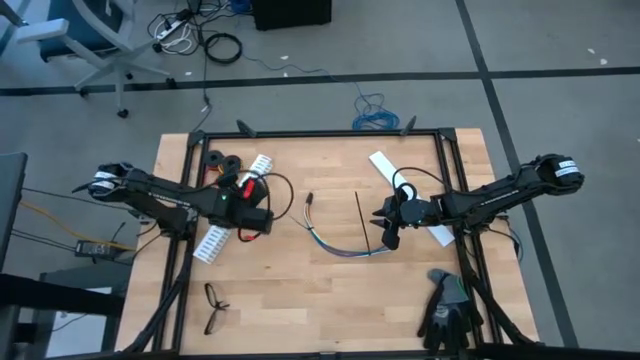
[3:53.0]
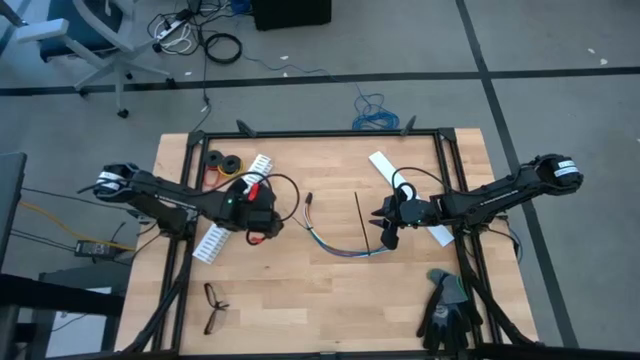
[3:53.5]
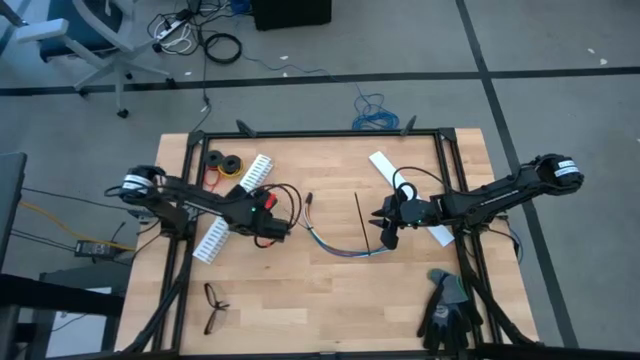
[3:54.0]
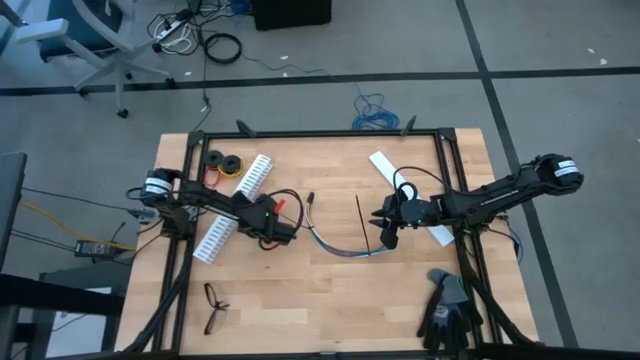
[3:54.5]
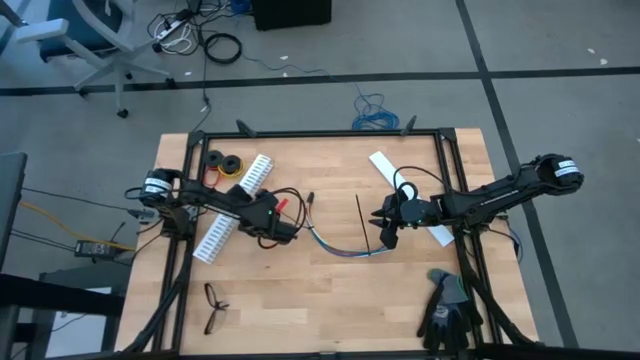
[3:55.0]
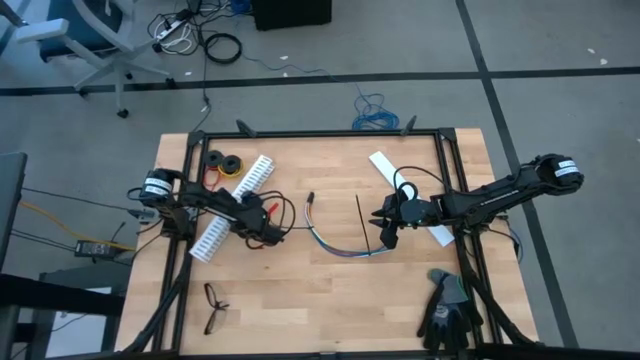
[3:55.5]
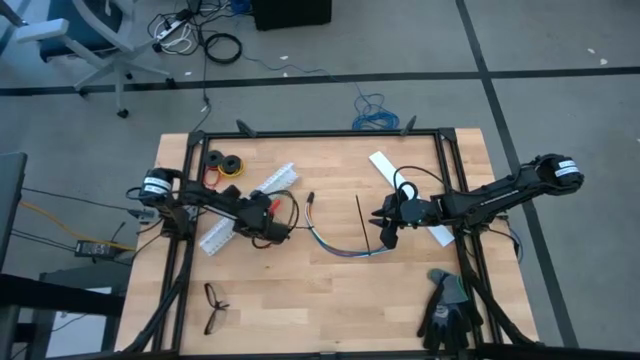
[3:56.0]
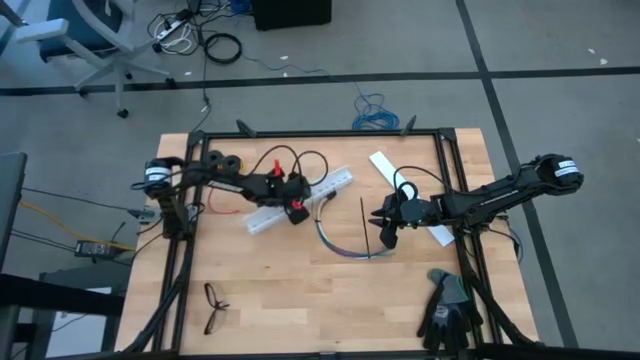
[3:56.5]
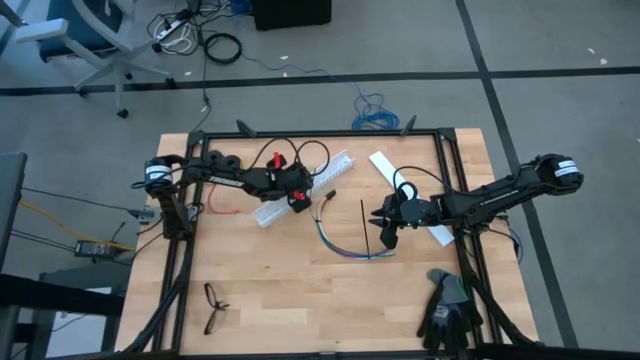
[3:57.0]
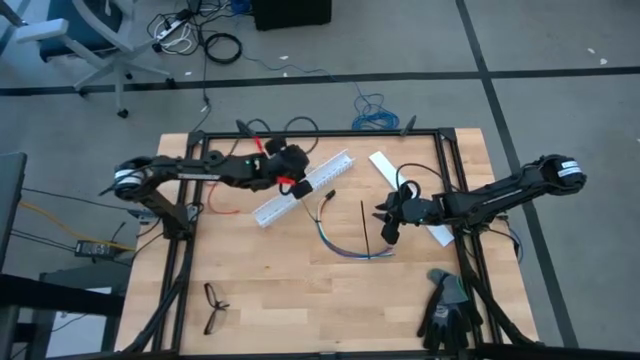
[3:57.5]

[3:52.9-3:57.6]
Task: Ziptie cables
Prepare the white cable duct

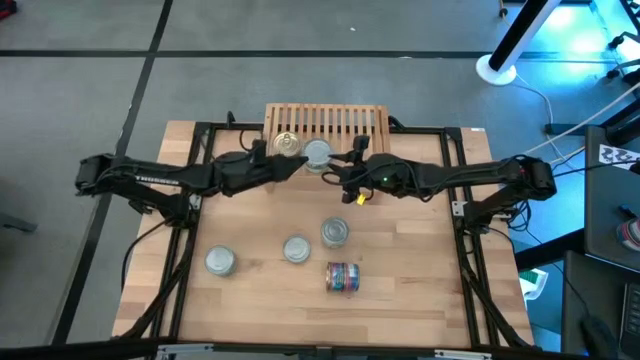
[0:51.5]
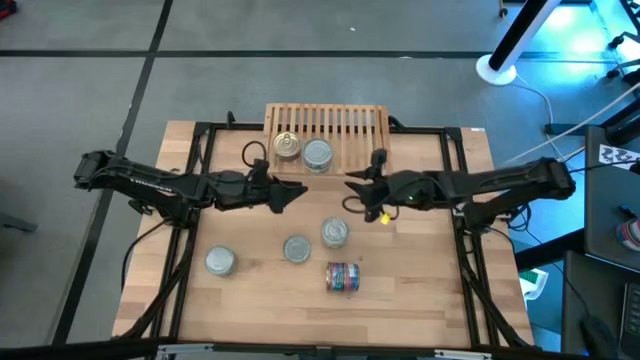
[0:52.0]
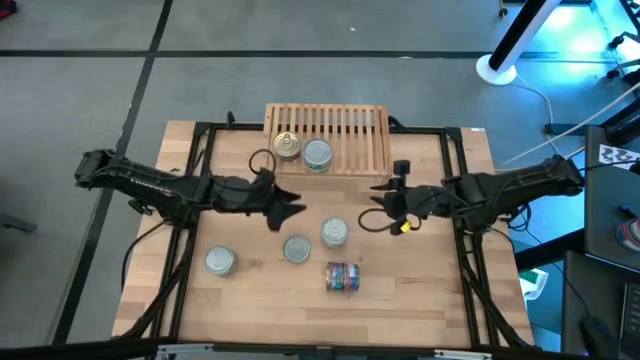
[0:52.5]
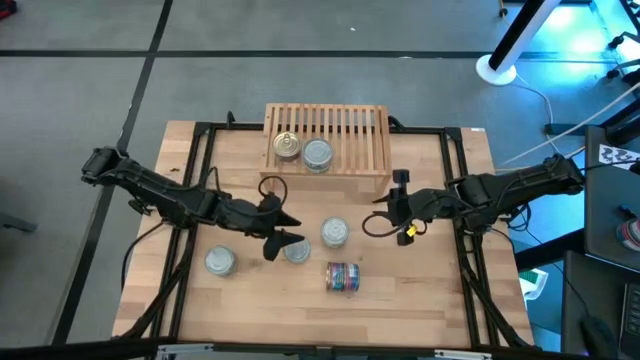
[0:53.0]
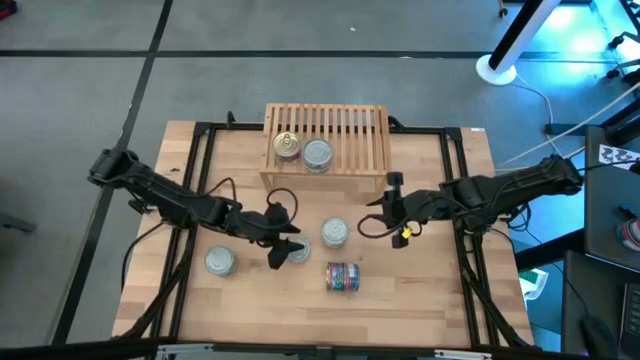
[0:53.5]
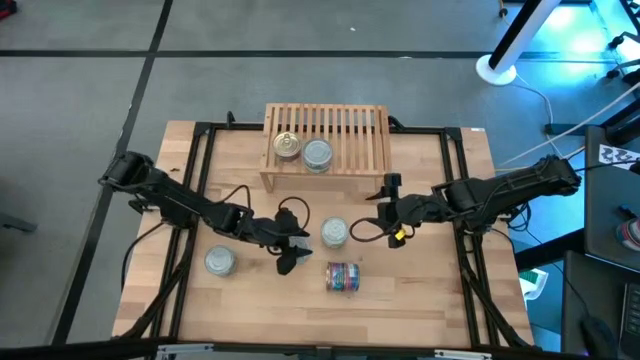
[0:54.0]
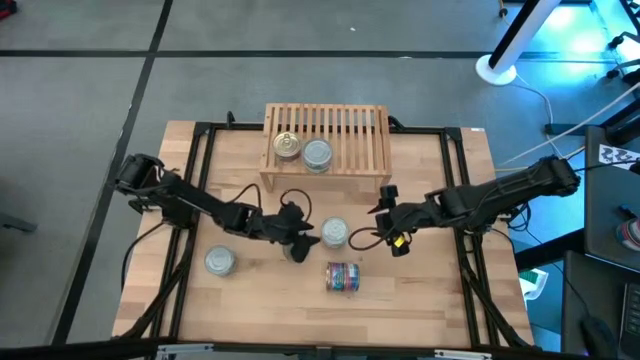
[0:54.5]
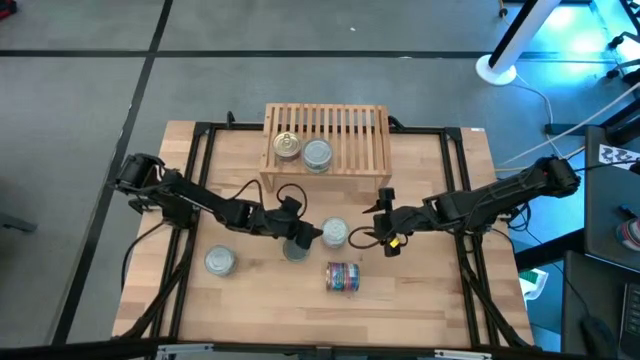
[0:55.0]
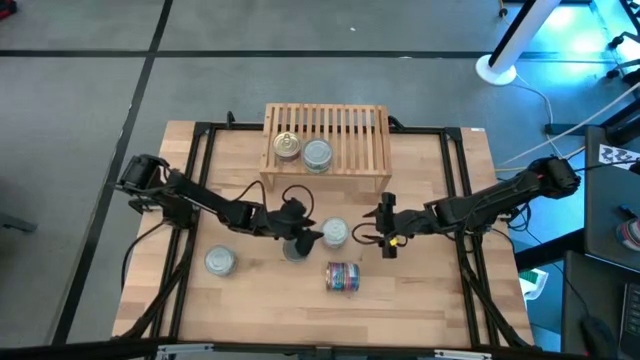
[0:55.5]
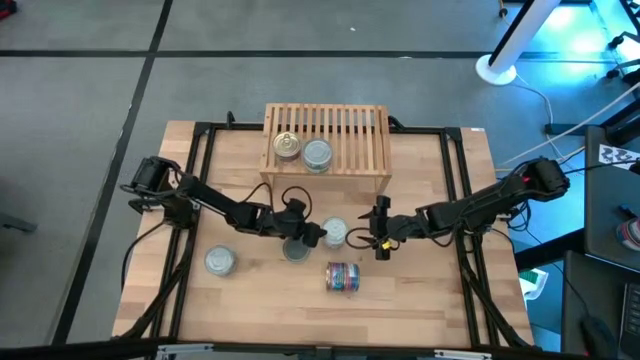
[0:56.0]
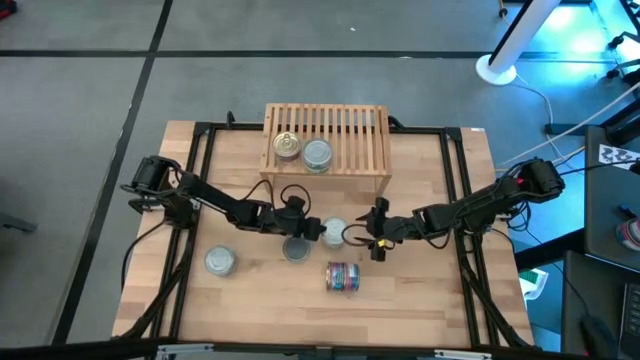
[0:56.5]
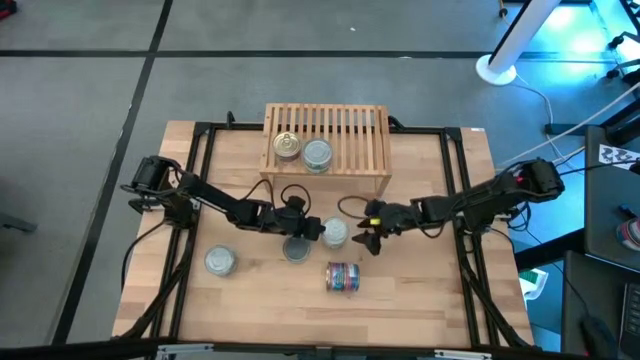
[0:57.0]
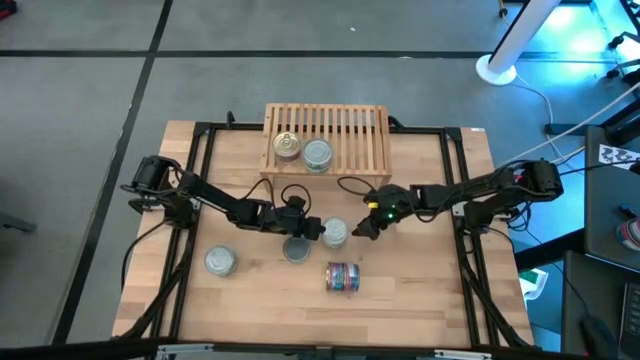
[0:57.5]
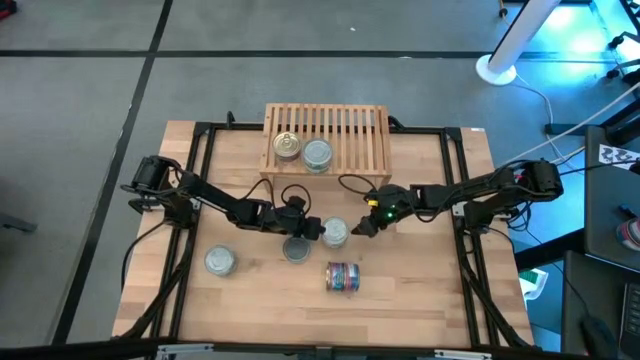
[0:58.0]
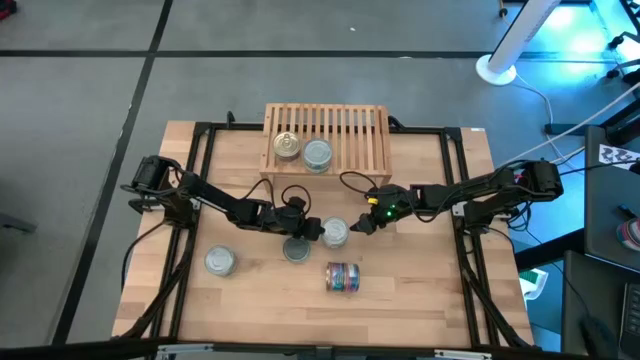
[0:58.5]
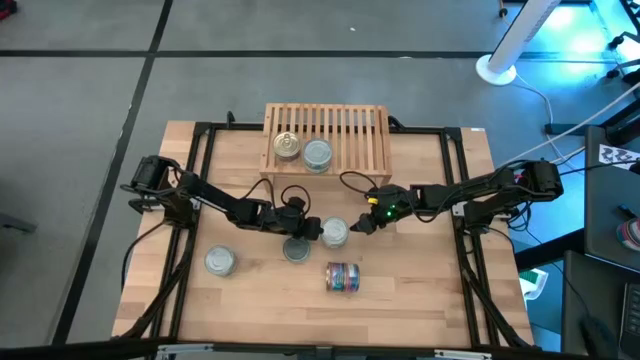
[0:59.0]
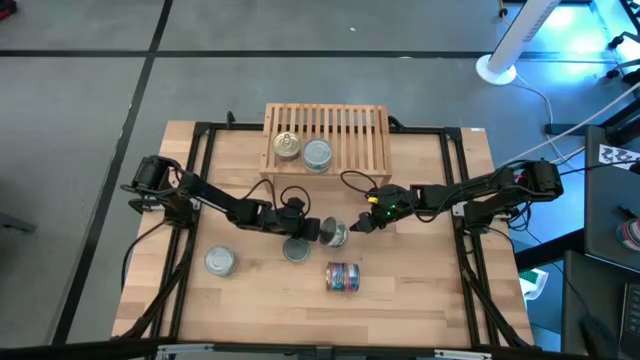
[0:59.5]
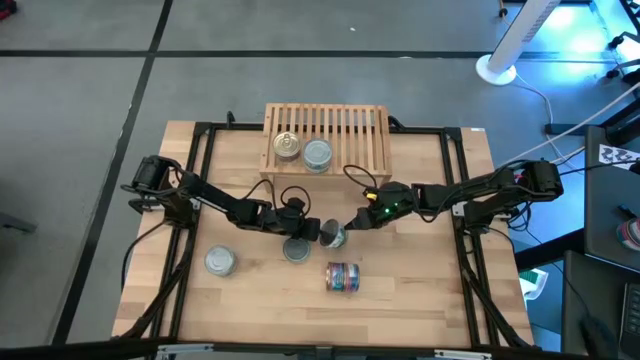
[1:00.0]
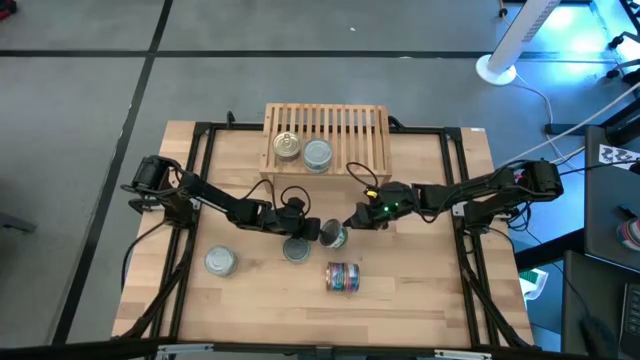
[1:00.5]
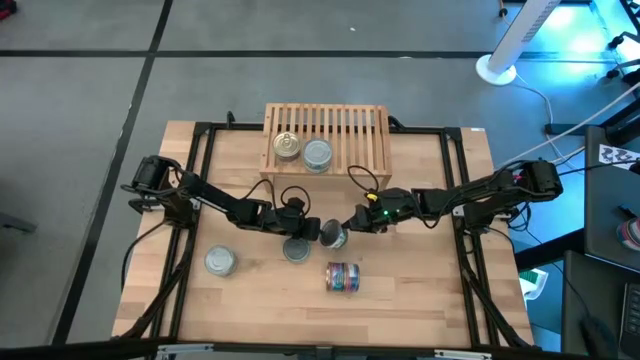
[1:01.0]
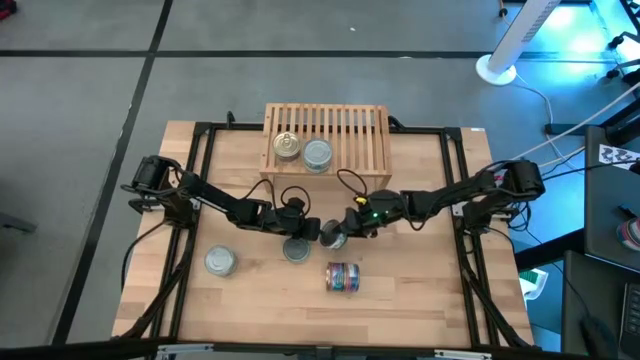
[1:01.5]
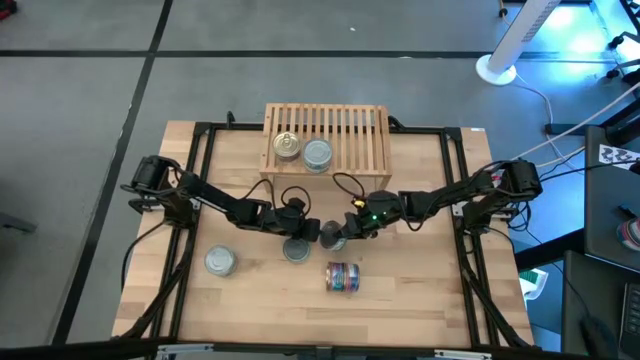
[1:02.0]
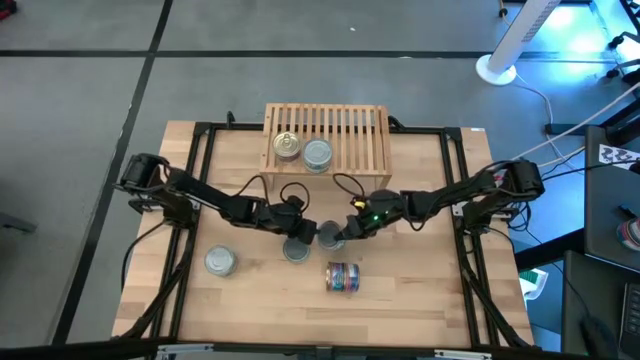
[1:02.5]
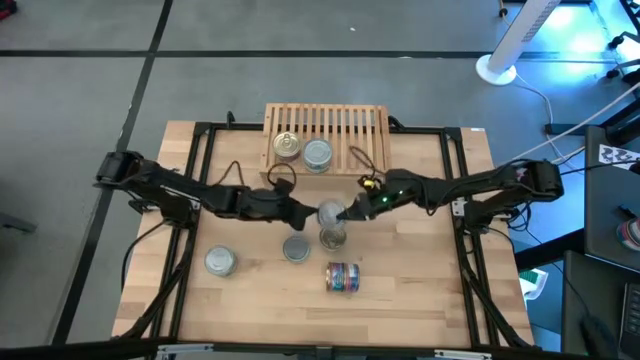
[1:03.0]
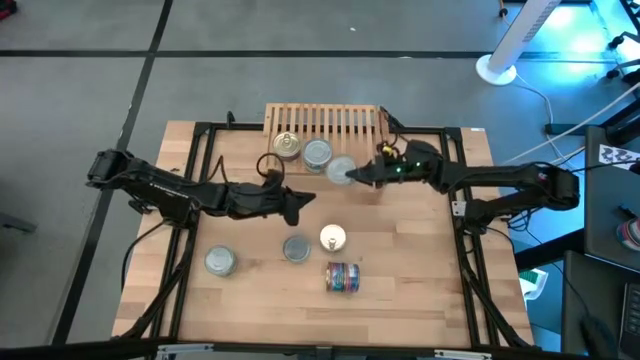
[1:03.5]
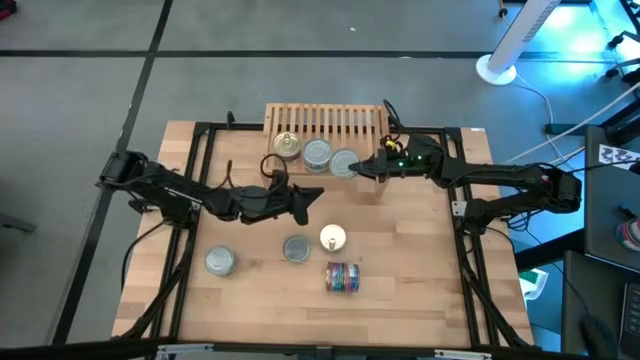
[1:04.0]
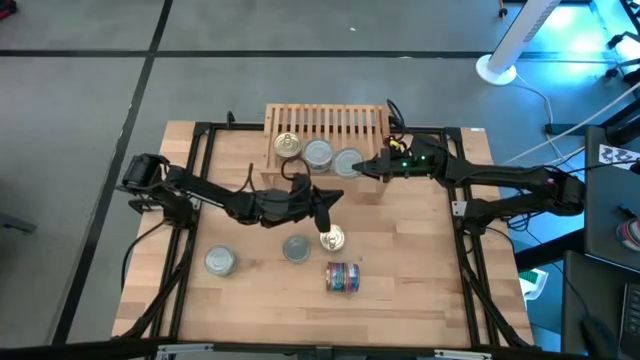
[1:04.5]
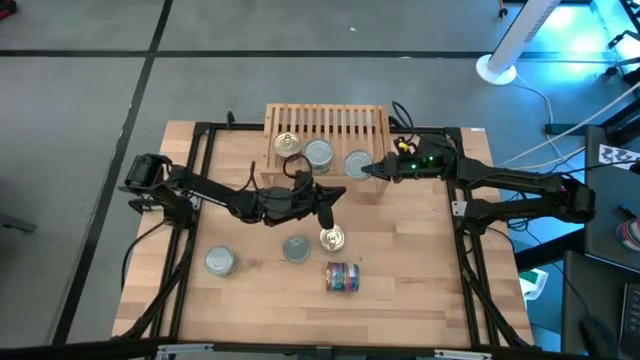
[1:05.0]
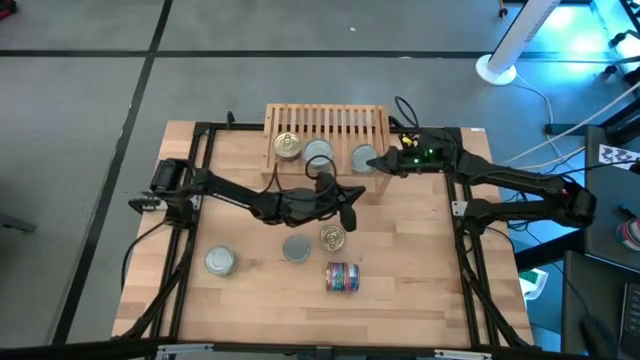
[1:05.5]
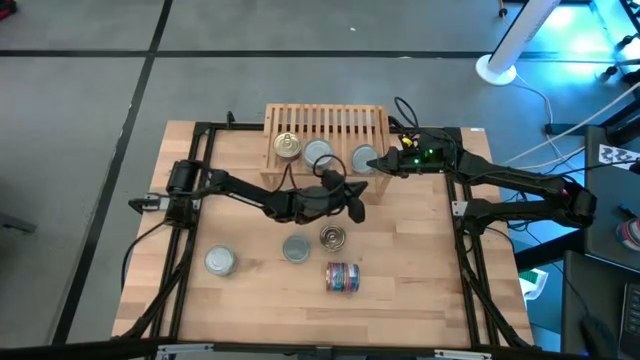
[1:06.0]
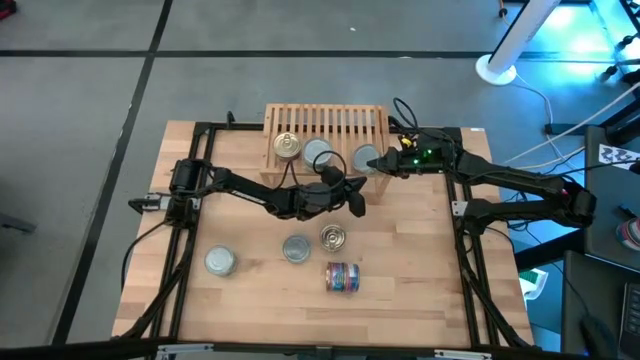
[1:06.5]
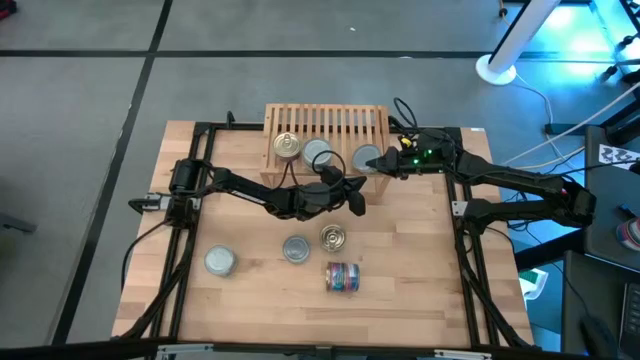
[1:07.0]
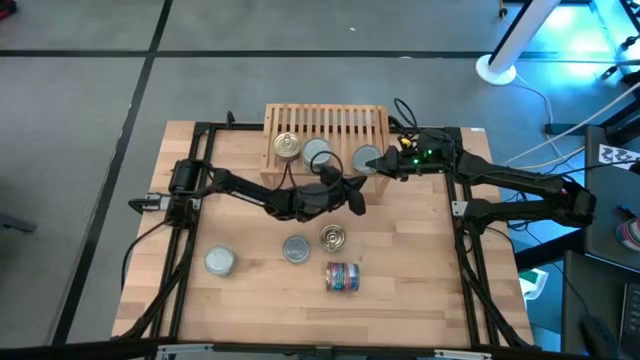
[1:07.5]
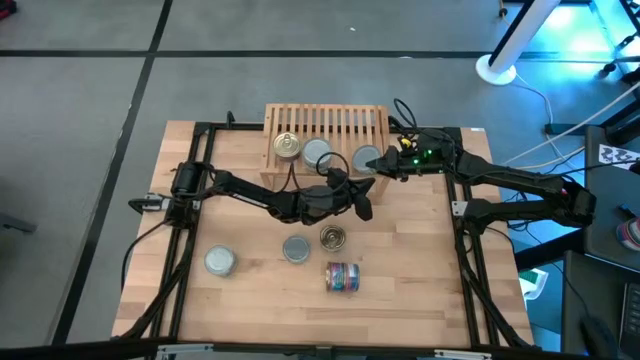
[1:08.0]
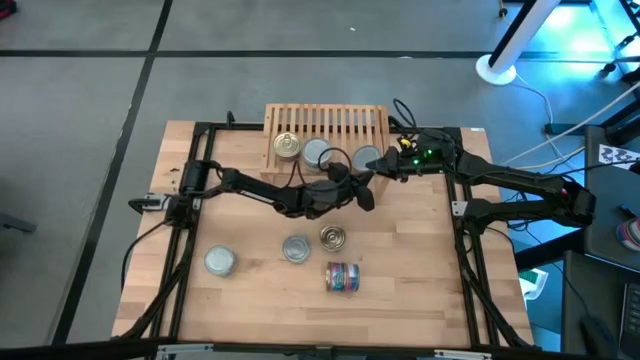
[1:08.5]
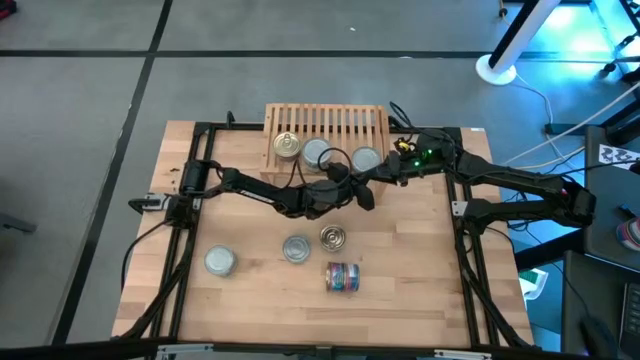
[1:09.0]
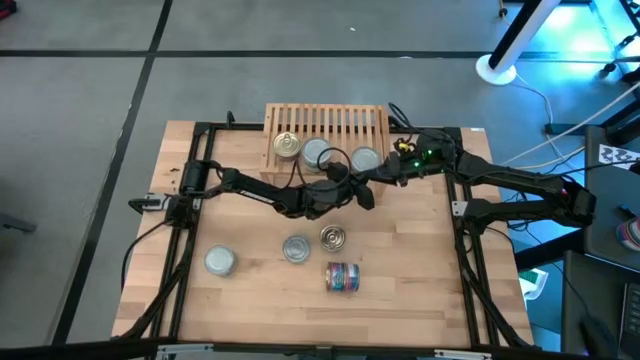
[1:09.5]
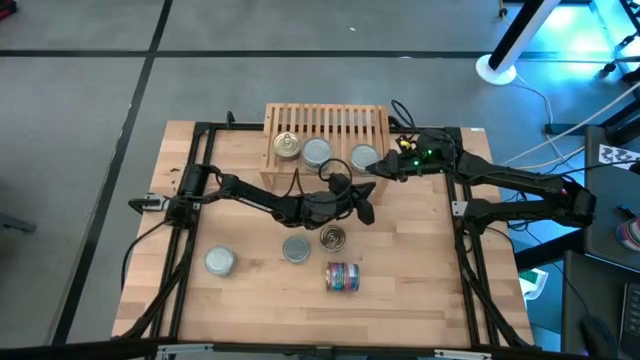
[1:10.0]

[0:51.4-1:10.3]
Task: Stack canned seafood by type on shelf
Put the green tuna can on the shelf
